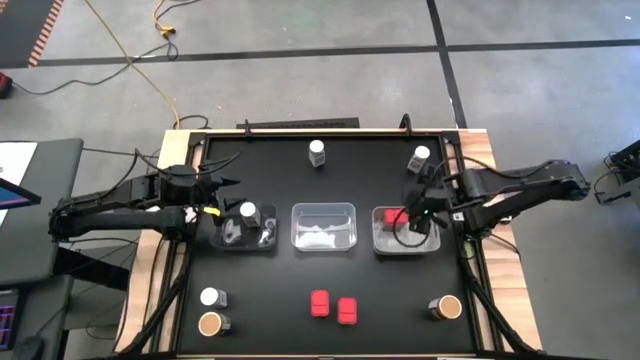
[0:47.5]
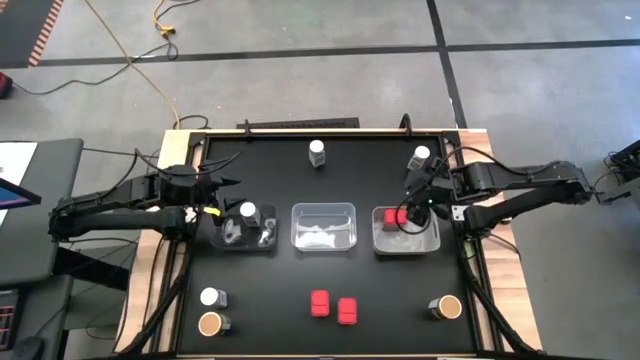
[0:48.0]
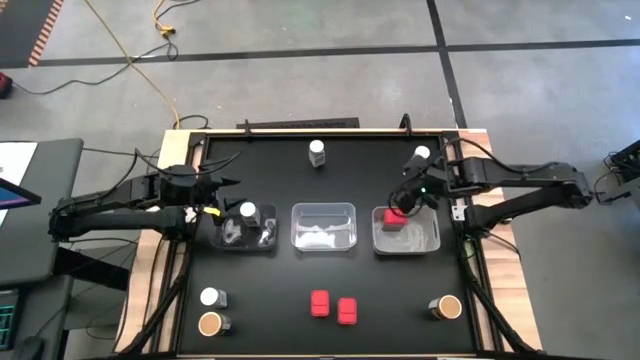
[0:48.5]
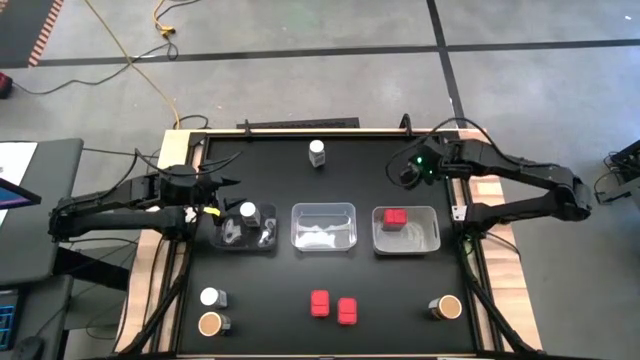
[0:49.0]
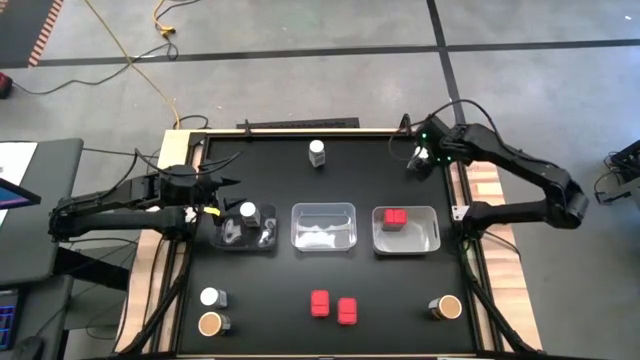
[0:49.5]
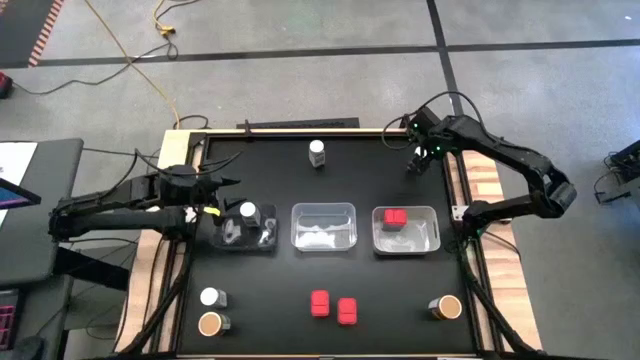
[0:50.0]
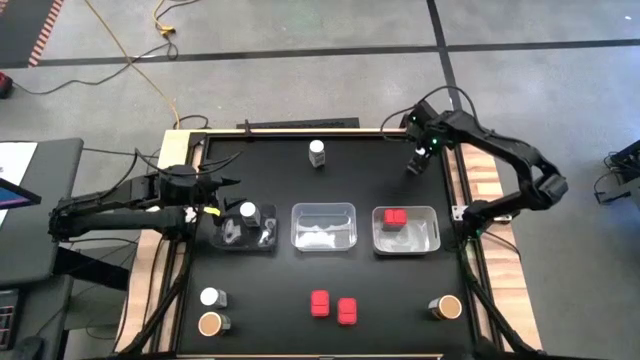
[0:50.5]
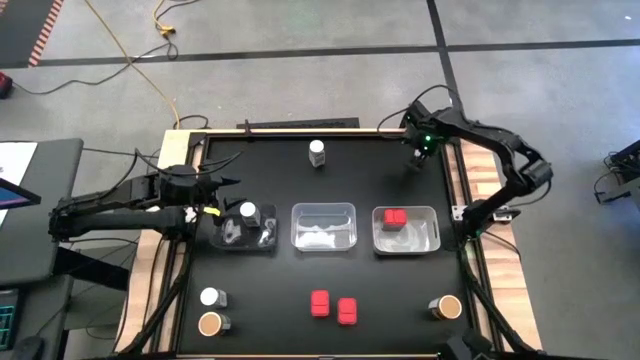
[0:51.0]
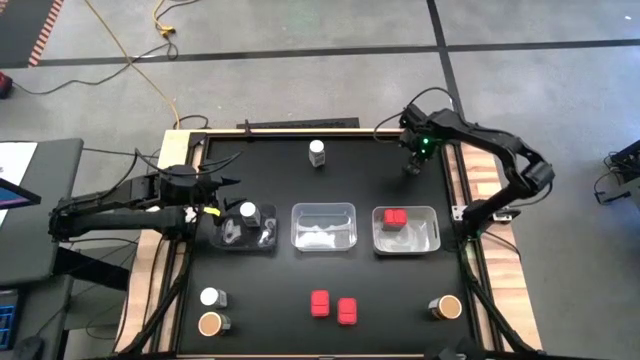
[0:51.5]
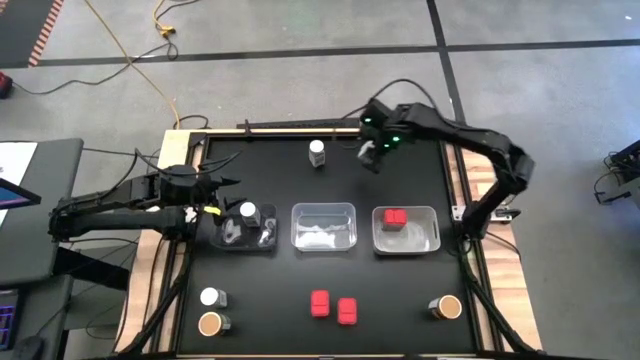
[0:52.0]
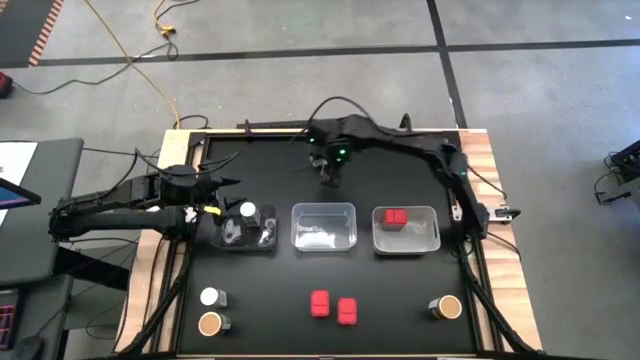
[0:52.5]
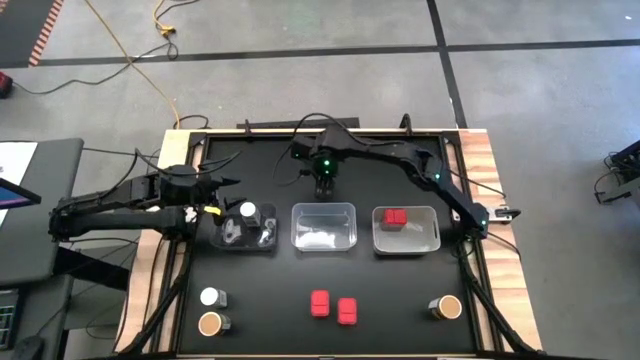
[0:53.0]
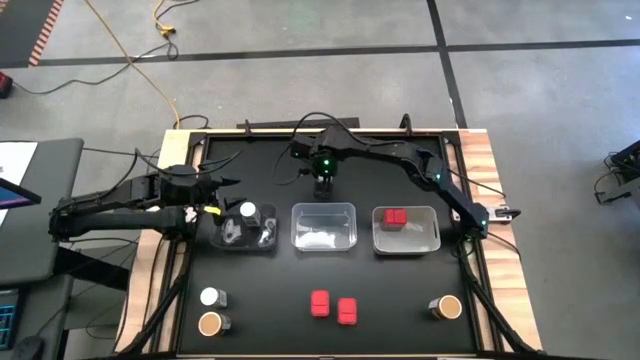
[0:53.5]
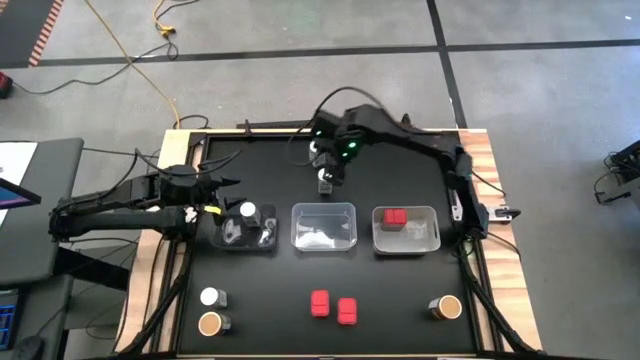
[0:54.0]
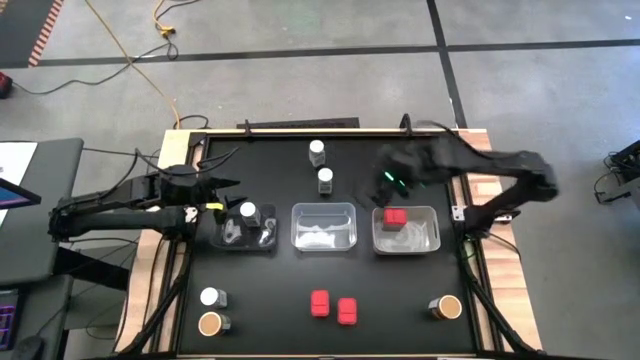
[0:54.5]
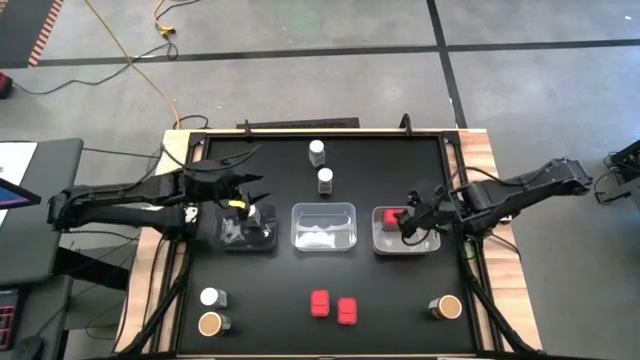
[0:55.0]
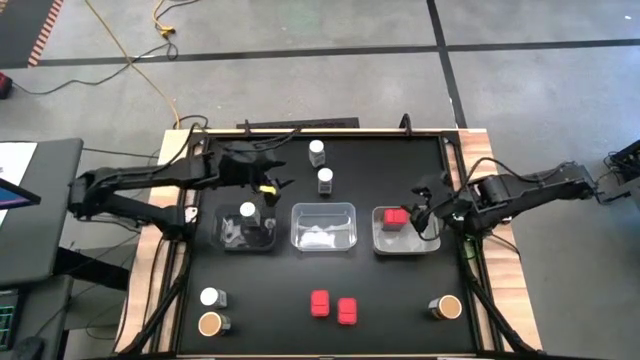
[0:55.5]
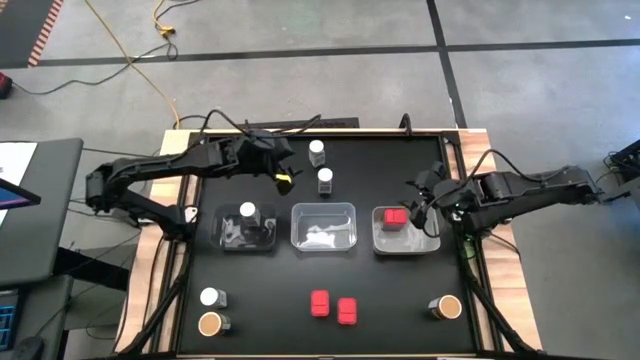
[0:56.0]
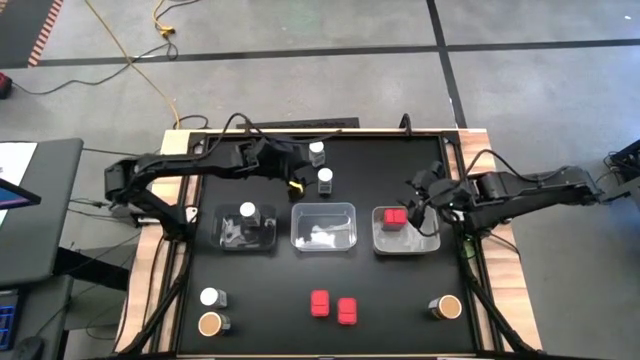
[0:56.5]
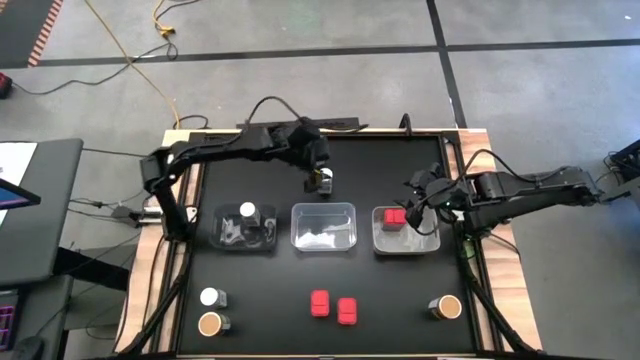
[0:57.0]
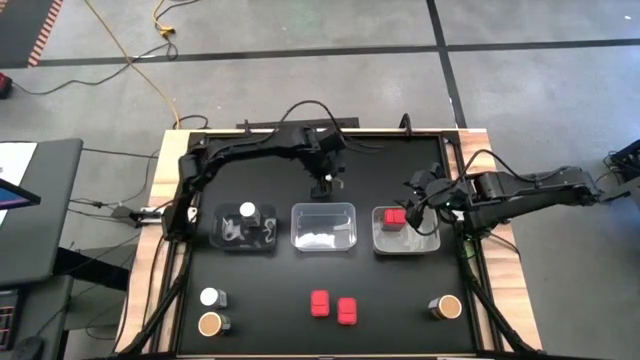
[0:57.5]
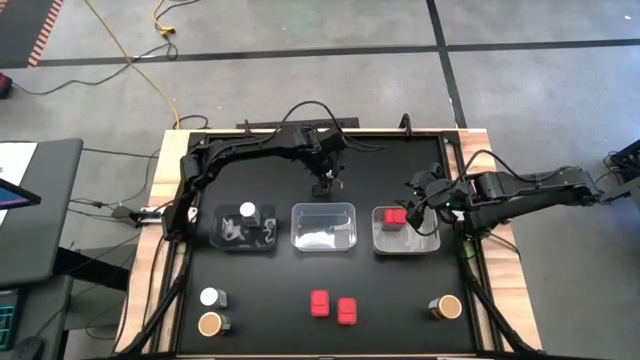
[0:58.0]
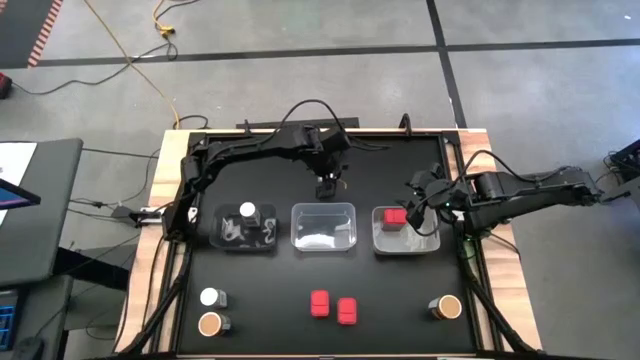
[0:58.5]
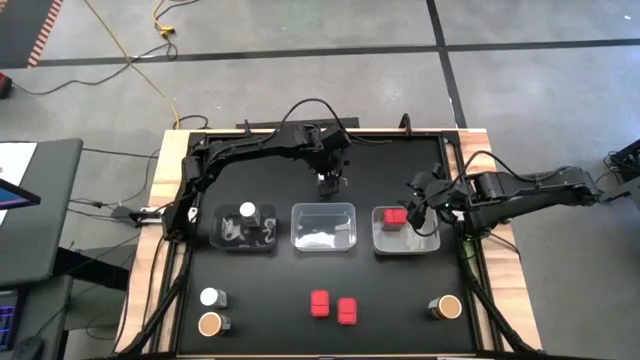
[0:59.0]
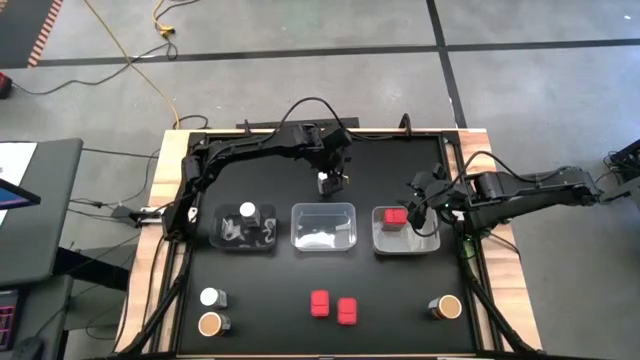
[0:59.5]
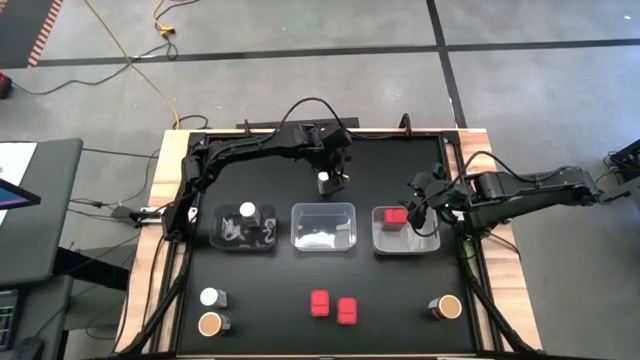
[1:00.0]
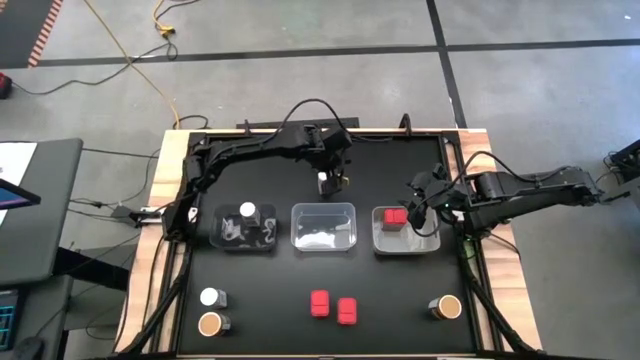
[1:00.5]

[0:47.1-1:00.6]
Task: Sort spices by type
Put the top right white seasoning bottle into the black bin

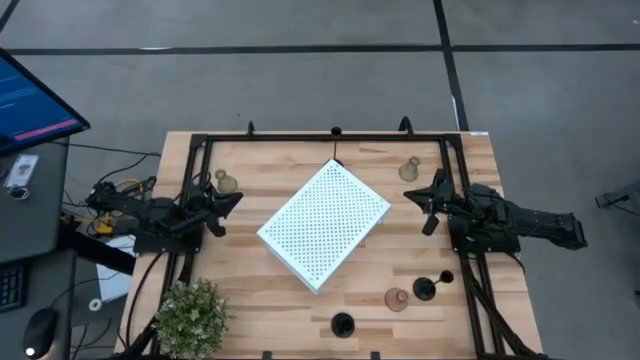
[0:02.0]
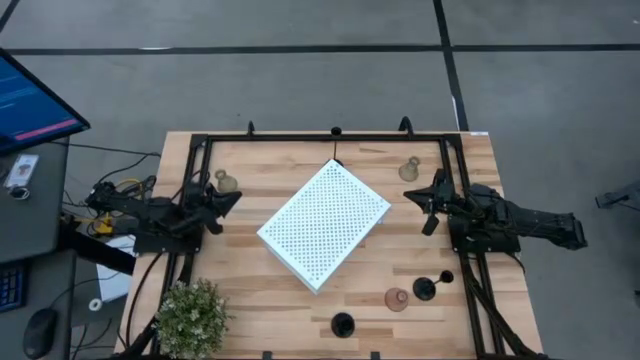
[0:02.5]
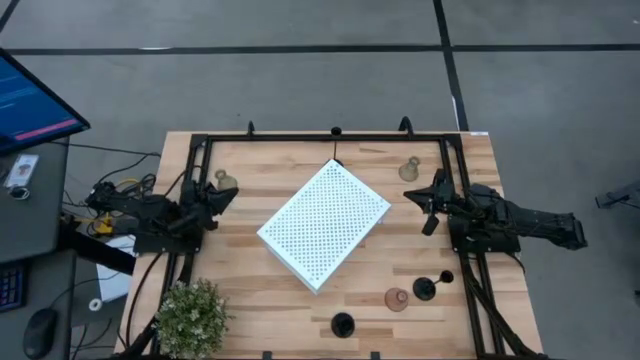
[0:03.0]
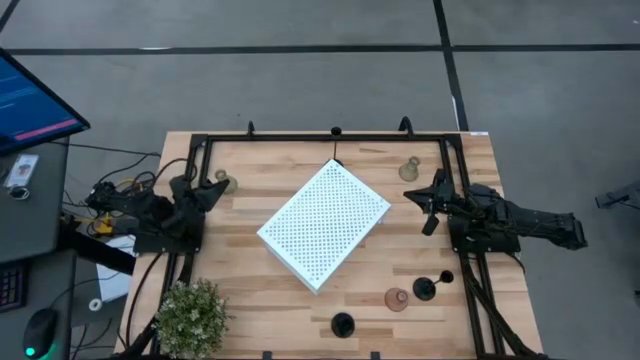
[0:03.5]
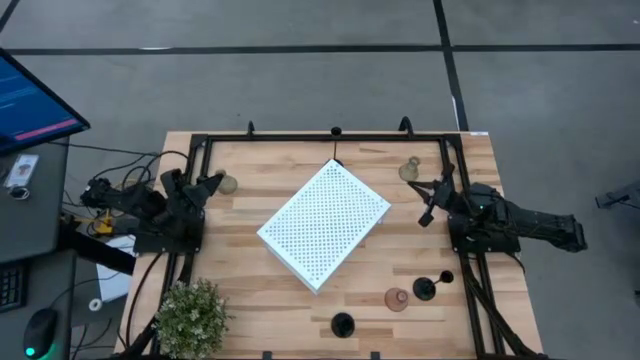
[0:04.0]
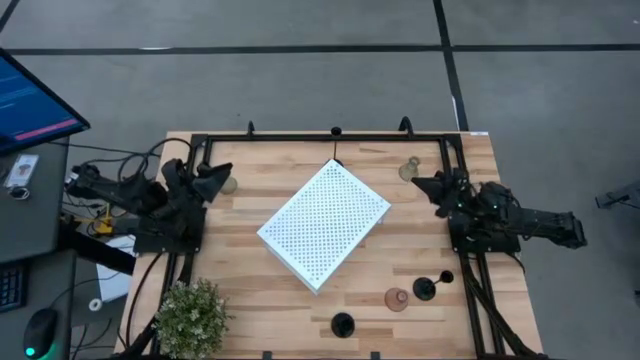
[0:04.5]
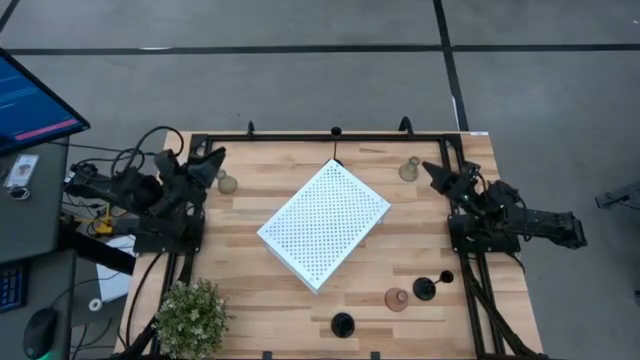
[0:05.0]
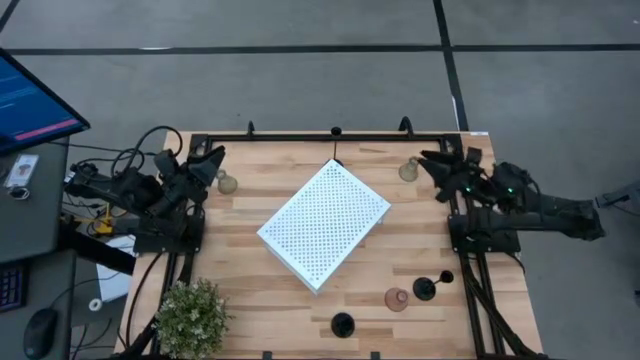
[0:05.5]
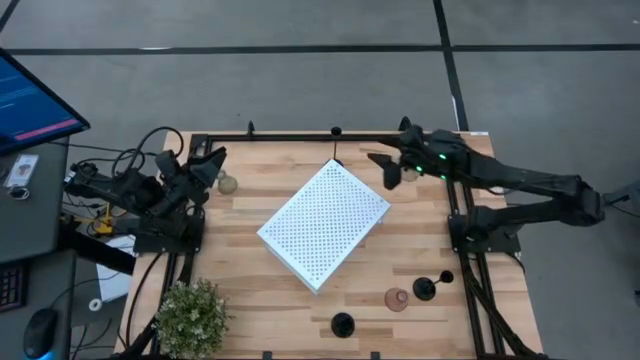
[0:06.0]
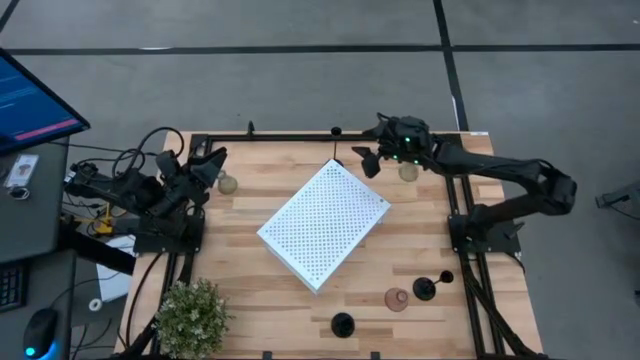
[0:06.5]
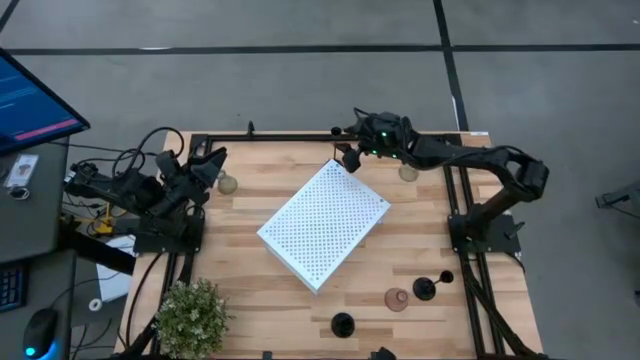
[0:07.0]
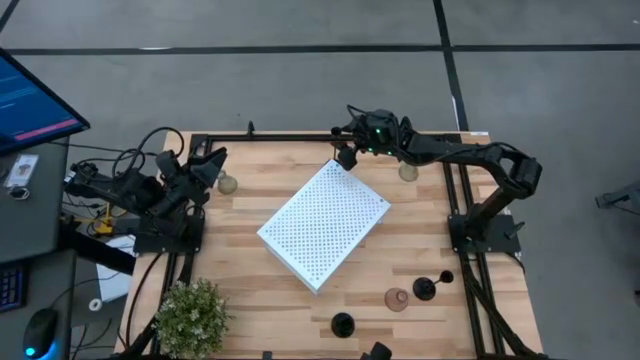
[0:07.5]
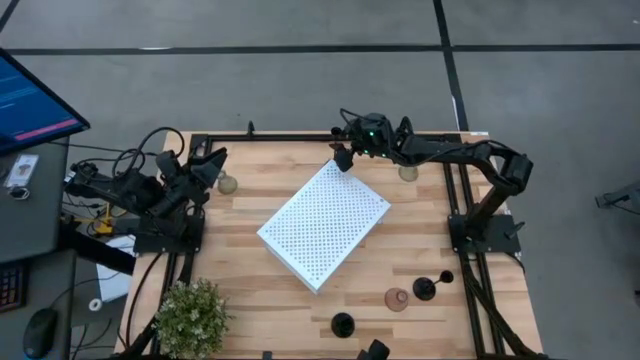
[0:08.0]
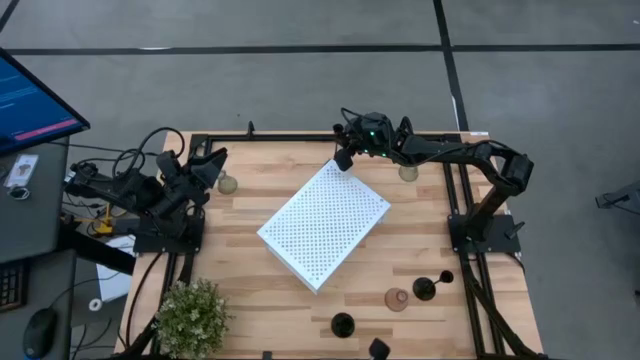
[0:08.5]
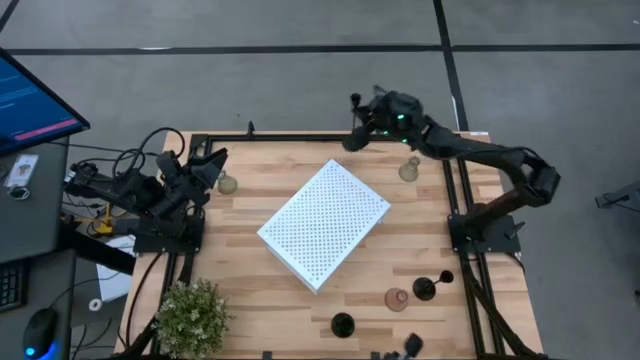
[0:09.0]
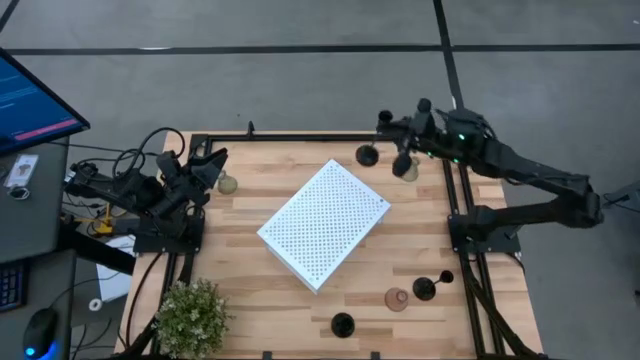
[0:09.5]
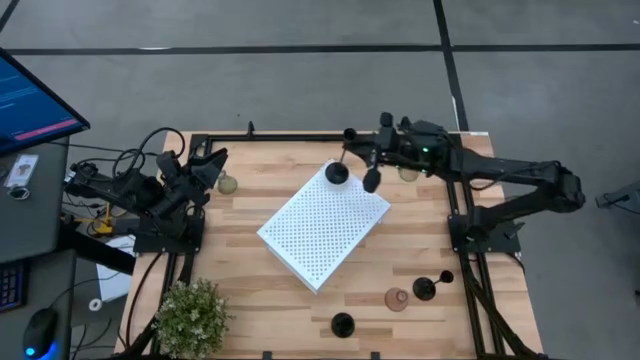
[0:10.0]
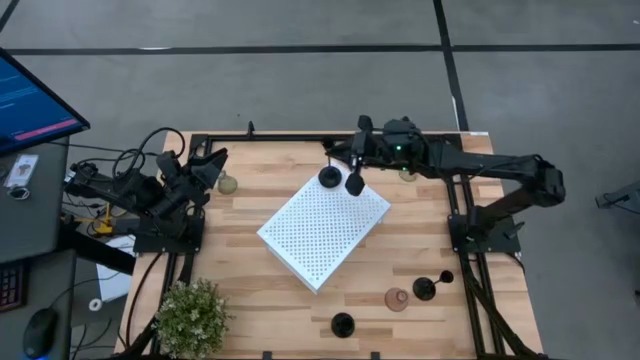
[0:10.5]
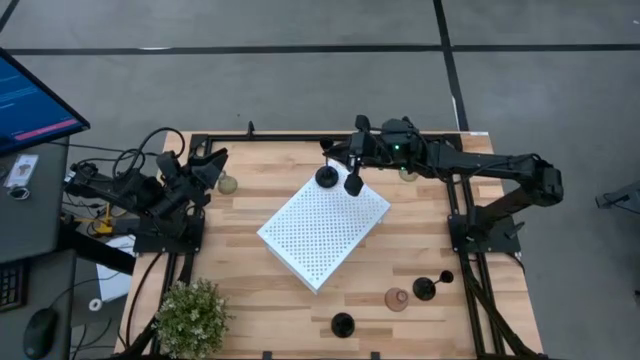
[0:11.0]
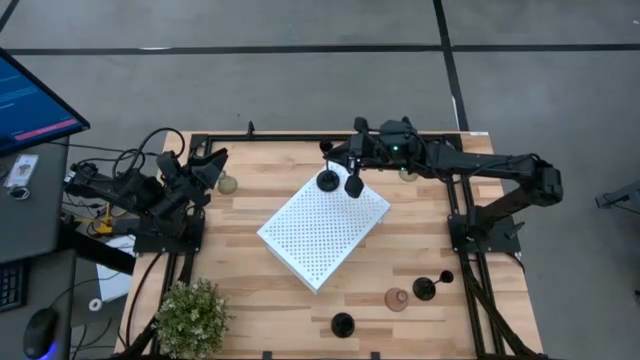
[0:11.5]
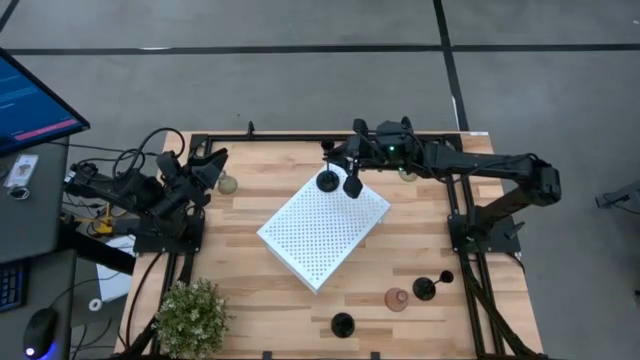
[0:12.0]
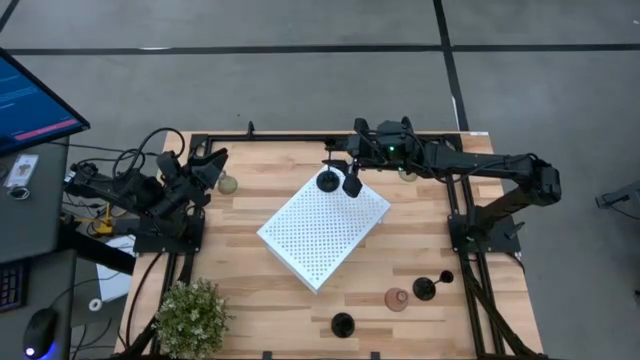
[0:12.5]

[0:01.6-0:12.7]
Task: Pick & Place candle stick holders
Put the top left black candle holder on the shelf
